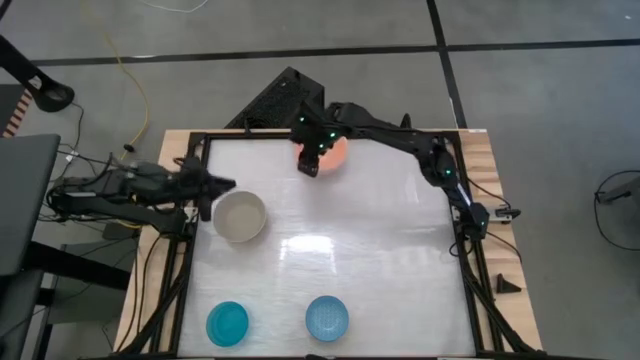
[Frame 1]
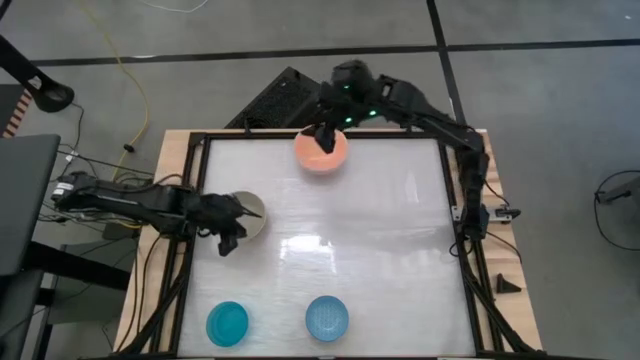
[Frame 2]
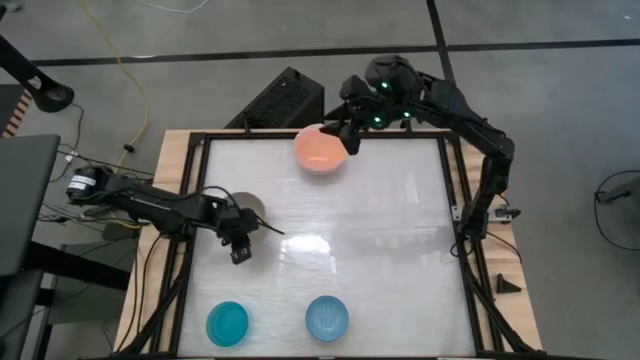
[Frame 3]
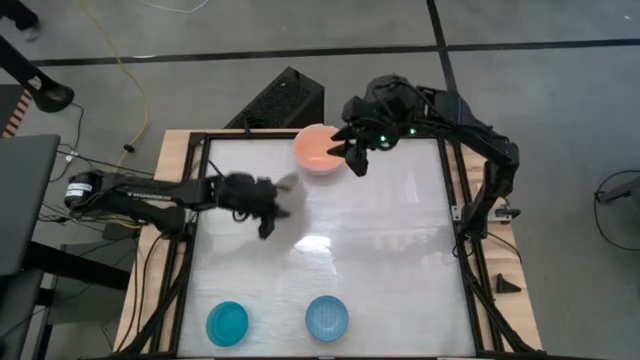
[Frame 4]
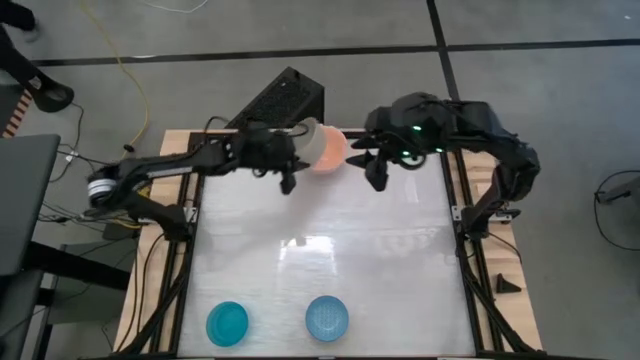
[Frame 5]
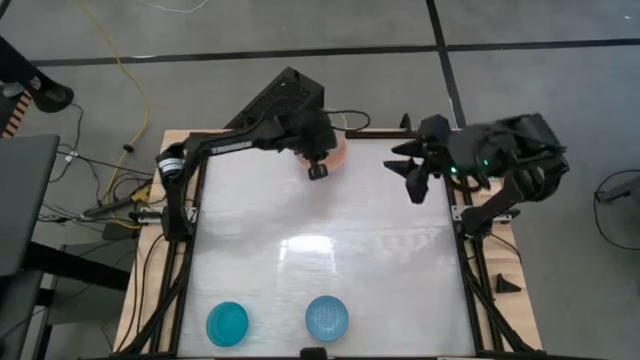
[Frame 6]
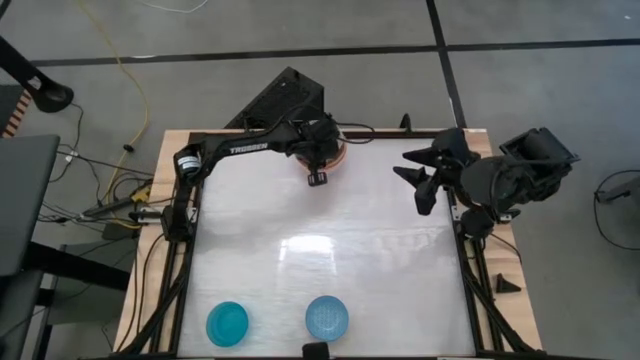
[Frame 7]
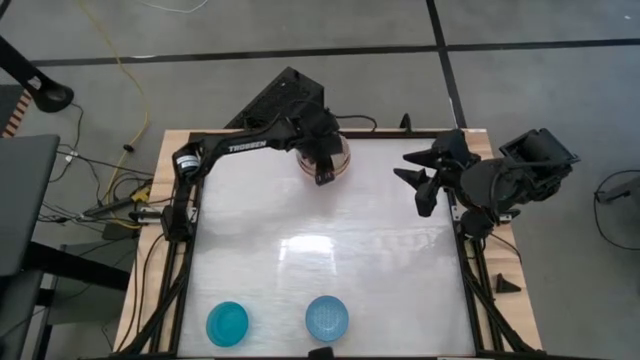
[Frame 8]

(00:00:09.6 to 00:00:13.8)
Stack the gray bowl on top of the orange bowl

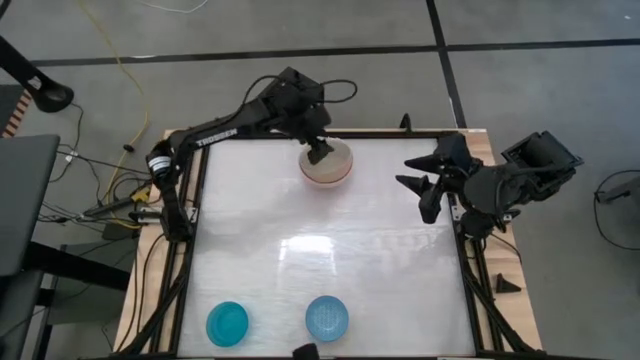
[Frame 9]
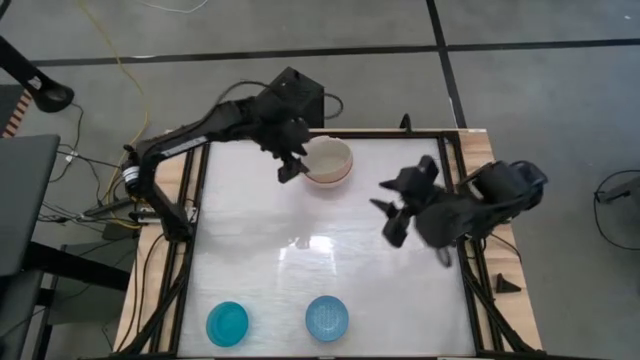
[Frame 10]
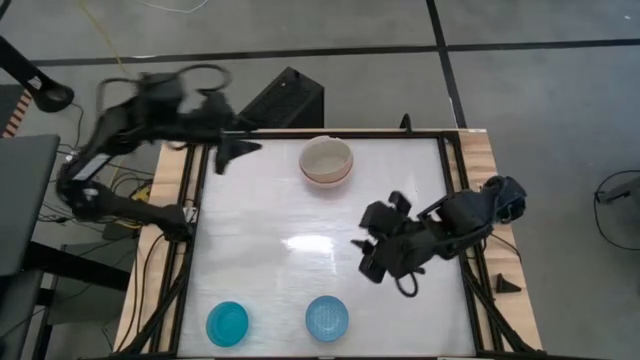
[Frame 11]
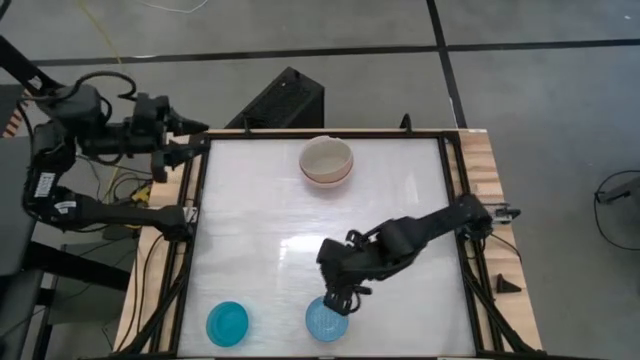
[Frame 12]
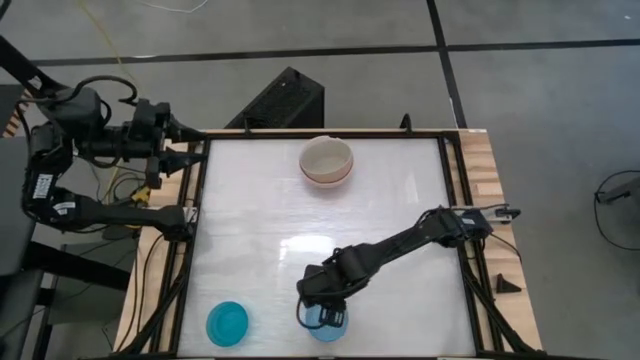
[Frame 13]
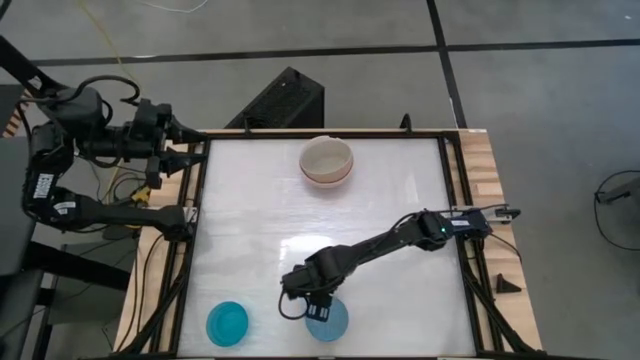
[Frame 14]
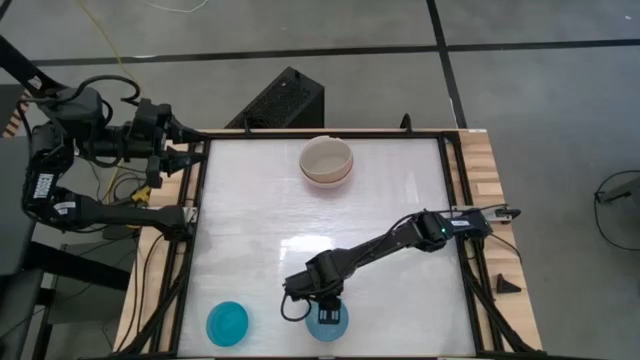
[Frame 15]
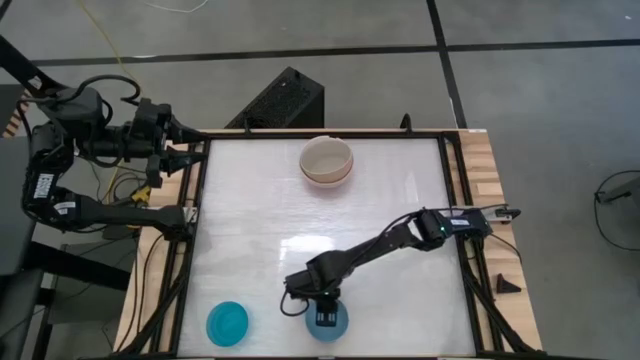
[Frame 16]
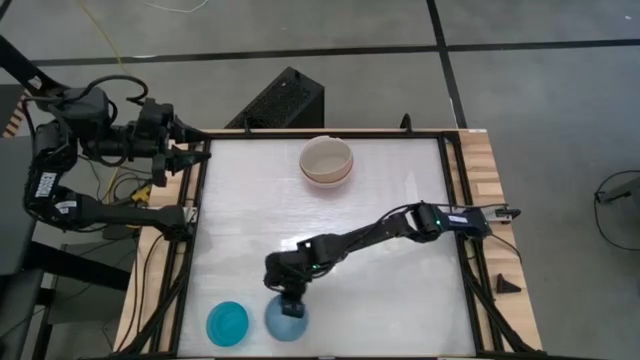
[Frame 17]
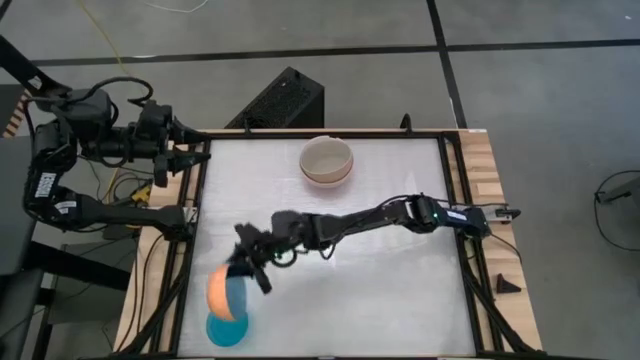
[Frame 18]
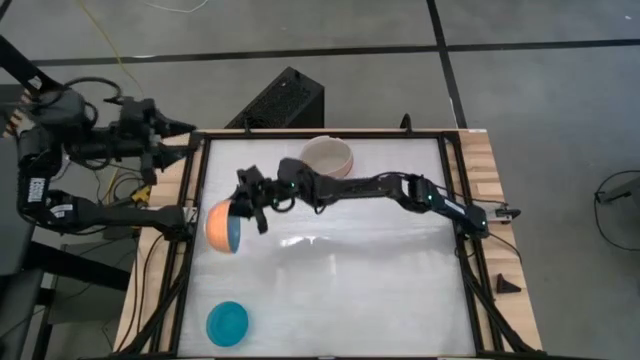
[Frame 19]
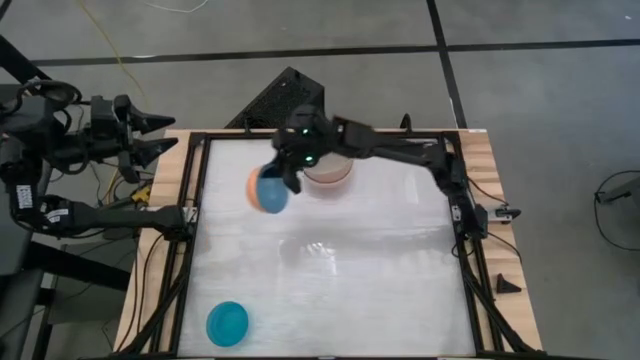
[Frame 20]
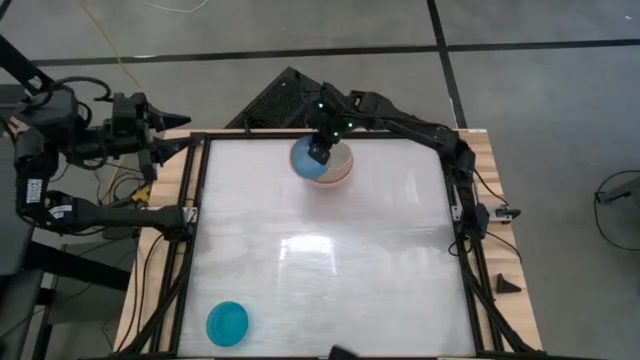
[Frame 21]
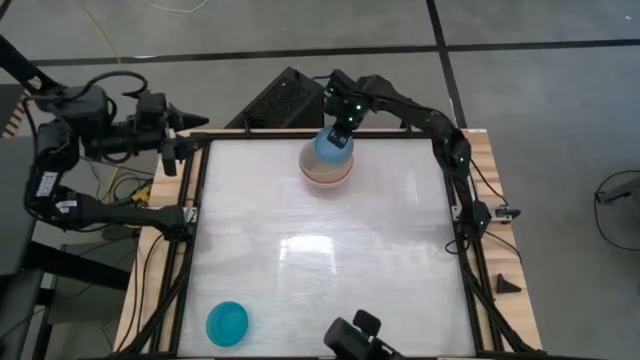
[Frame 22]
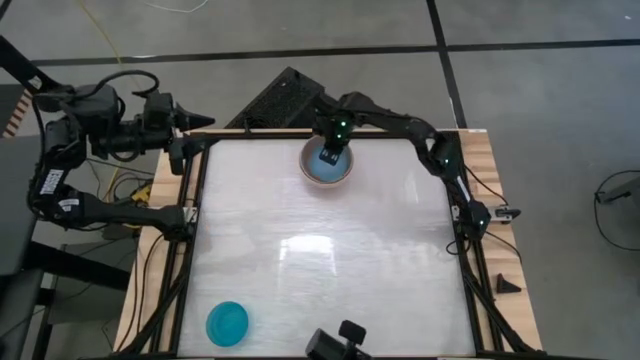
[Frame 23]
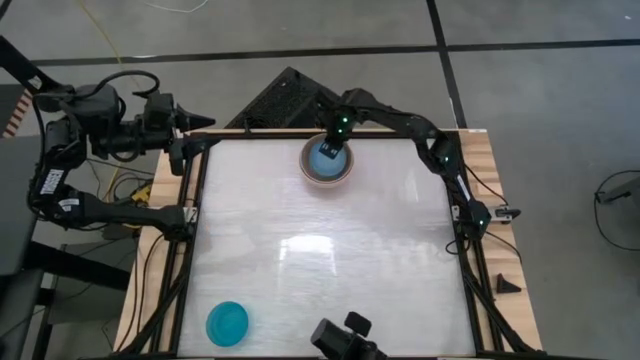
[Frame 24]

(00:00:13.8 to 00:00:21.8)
Stack the blue patterned bowl on top of the gray bowl

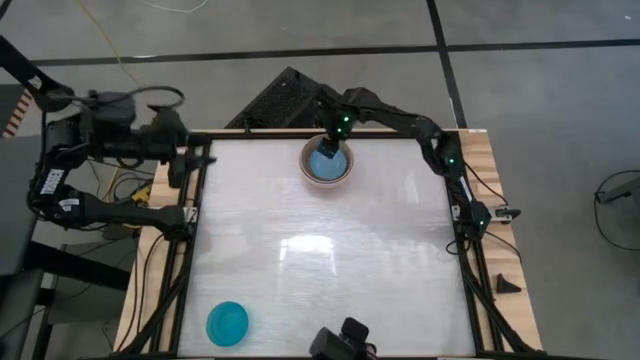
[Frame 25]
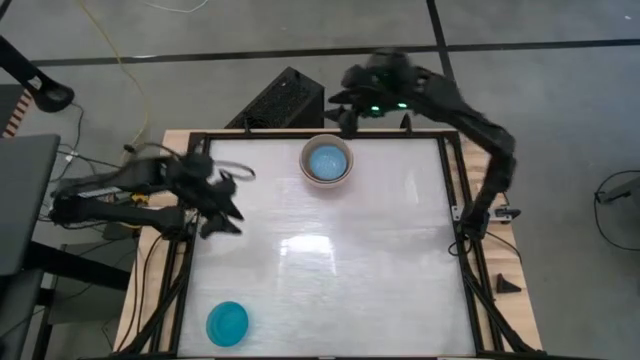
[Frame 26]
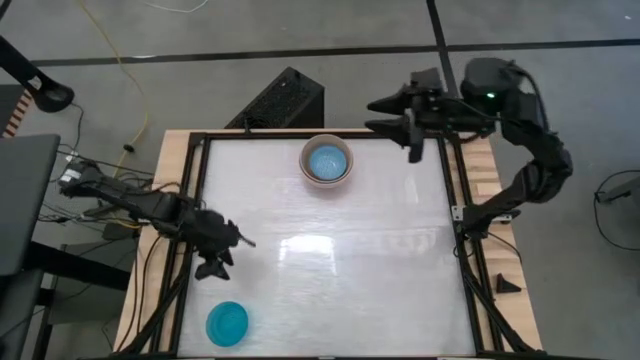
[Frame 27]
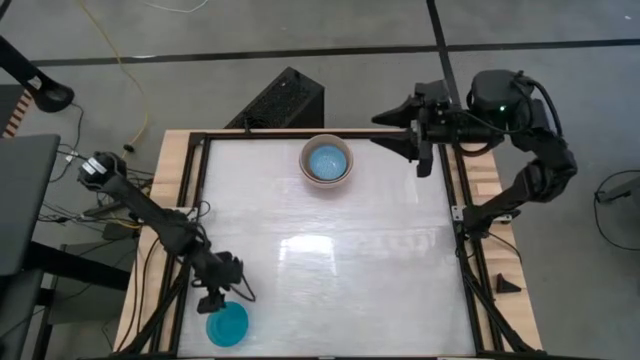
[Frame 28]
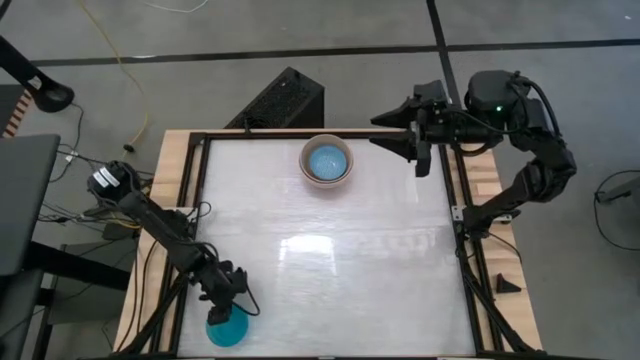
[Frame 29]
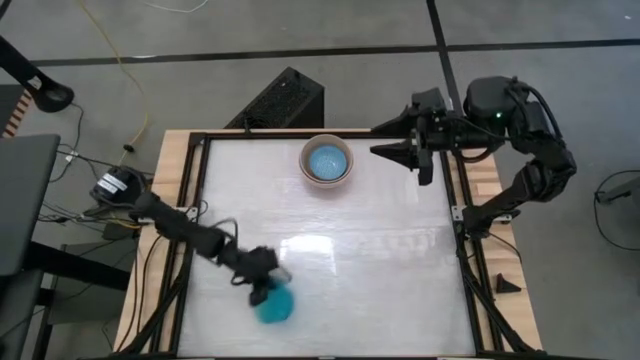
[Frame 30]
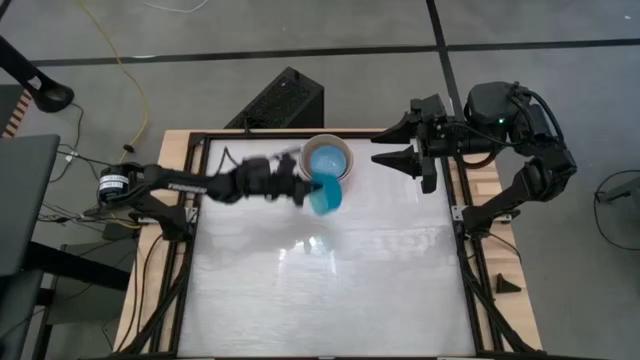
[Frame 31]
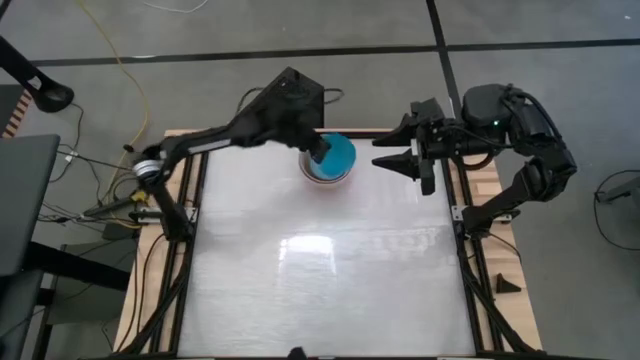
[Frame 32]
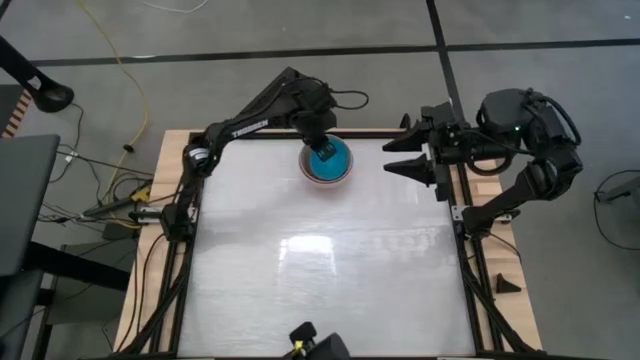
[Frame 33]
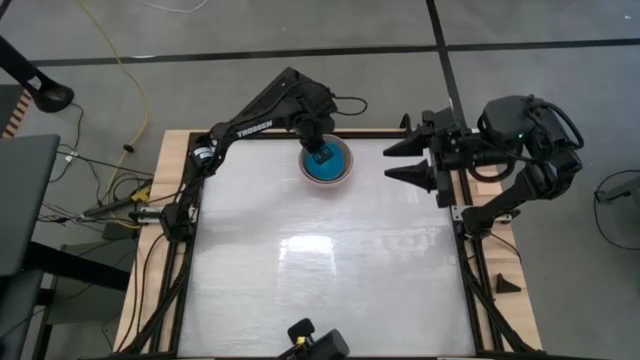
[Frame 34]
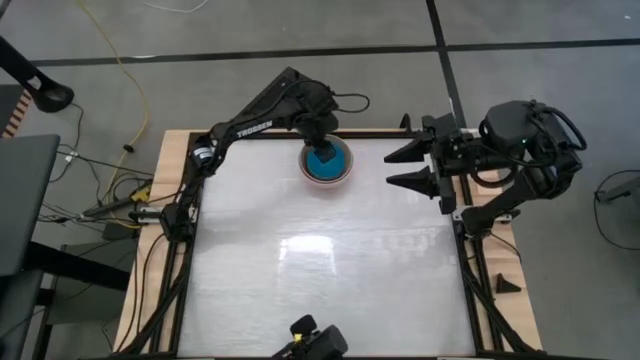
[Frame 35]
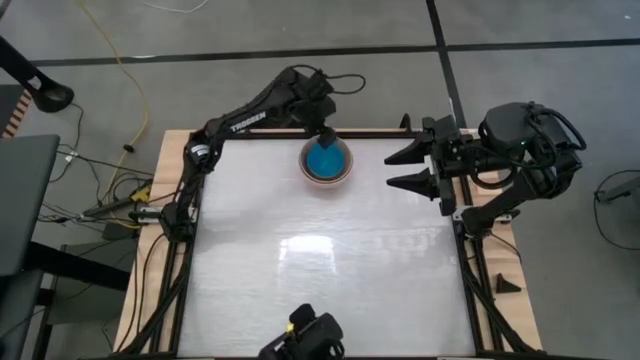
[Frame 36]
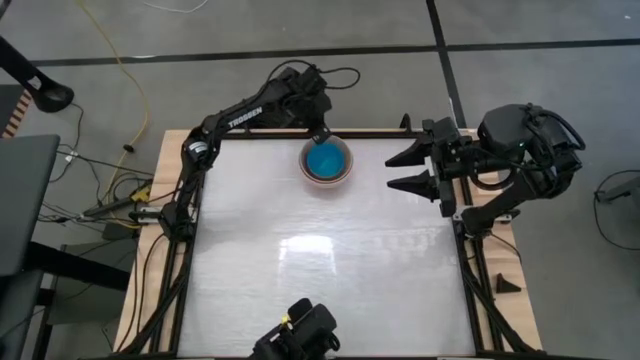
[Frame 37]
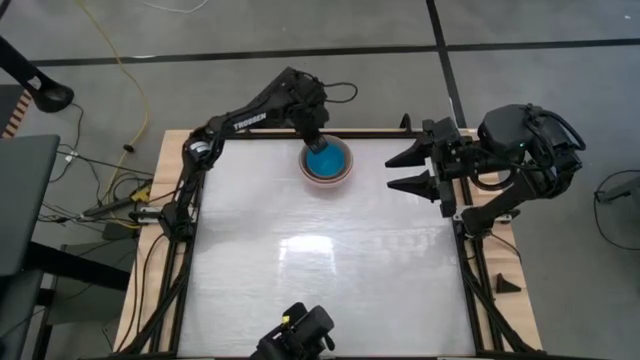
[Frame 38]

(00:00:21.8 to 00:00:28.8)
Stack the blue bowl on top of the blue patterned bowl

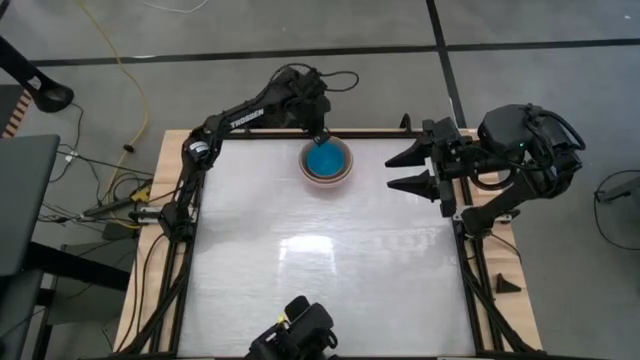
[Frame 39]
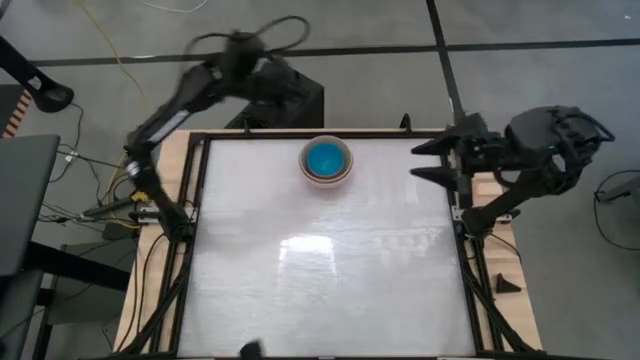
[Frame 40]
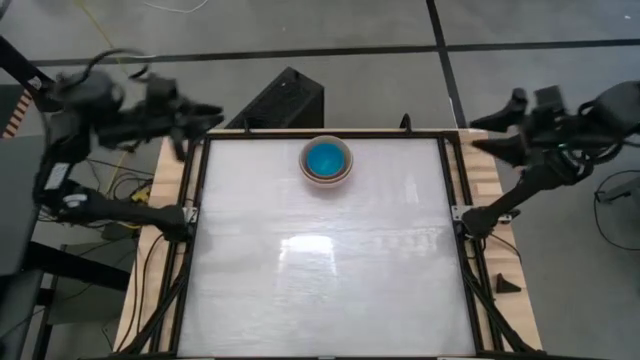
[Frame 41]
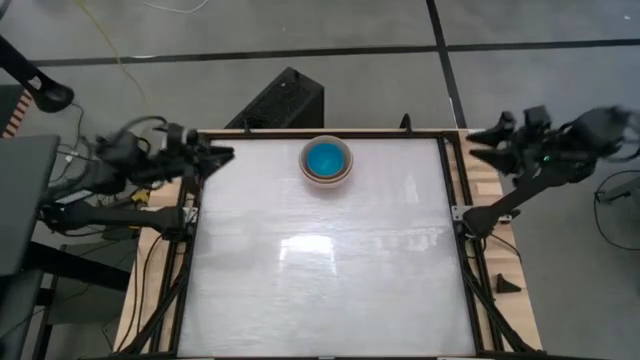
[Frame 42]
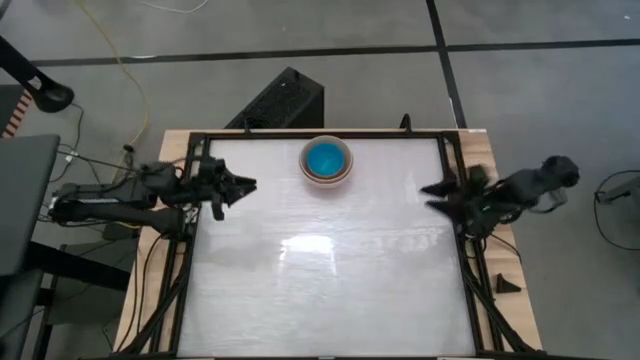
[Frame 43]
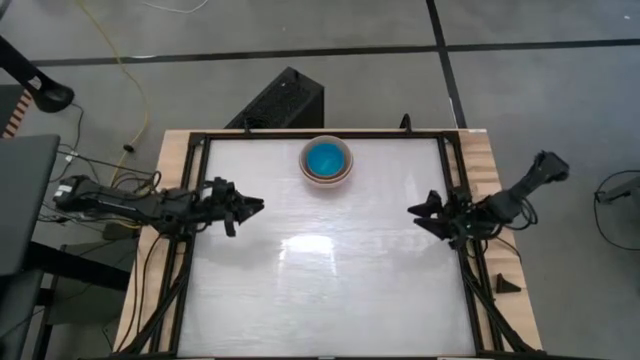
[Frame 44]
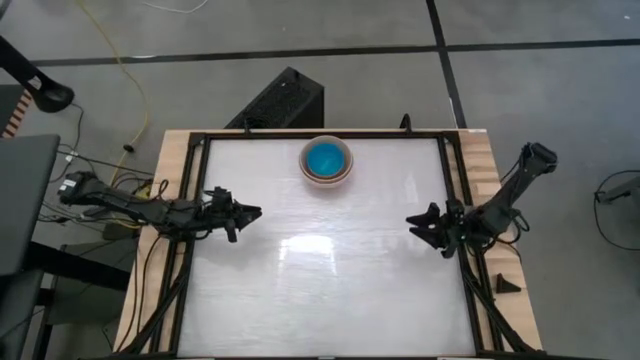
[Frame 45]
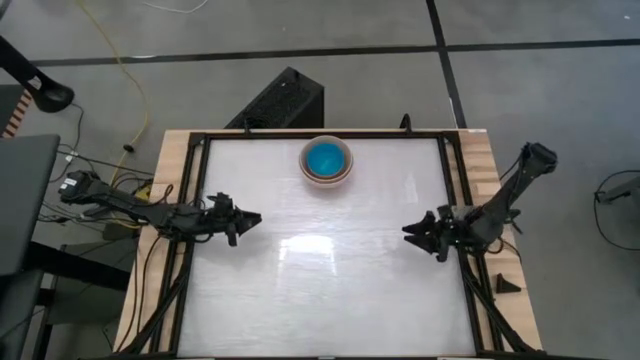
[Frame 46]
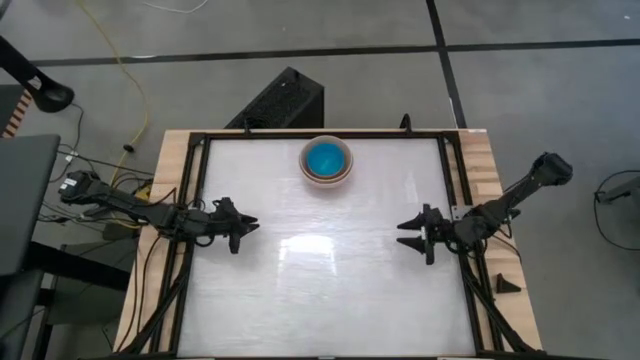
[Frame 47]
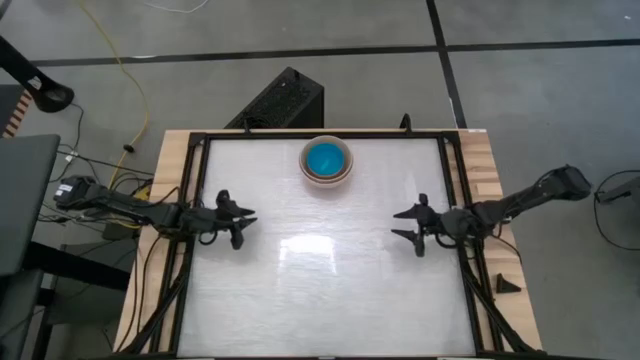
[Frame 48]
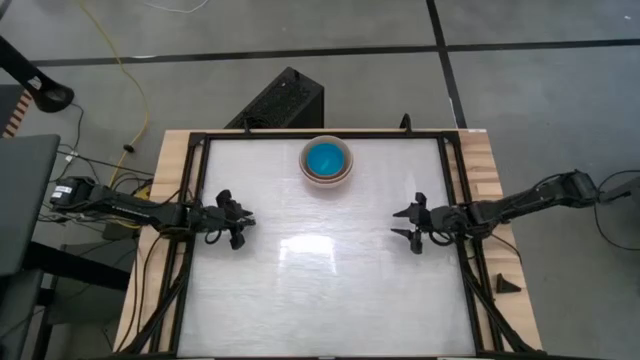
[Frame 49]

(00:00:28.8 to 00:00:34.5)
Return to Home Position
